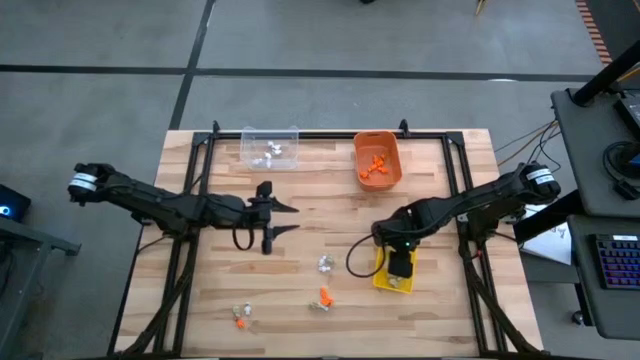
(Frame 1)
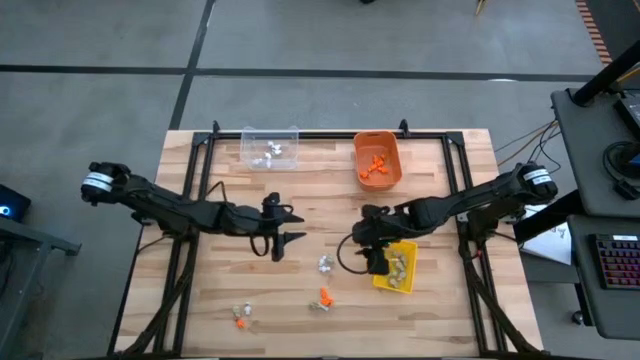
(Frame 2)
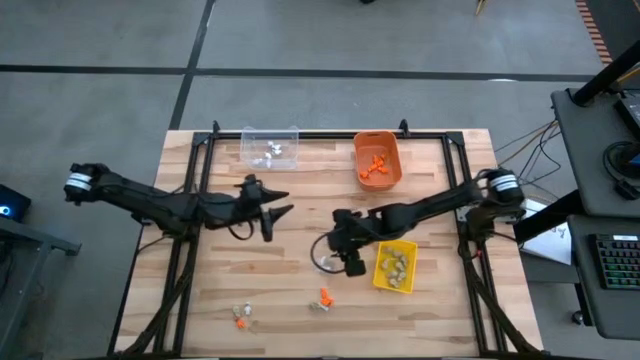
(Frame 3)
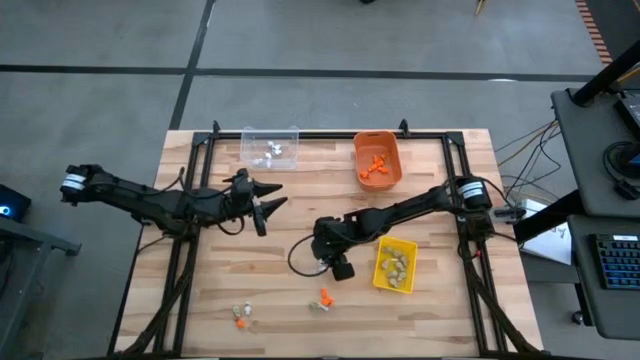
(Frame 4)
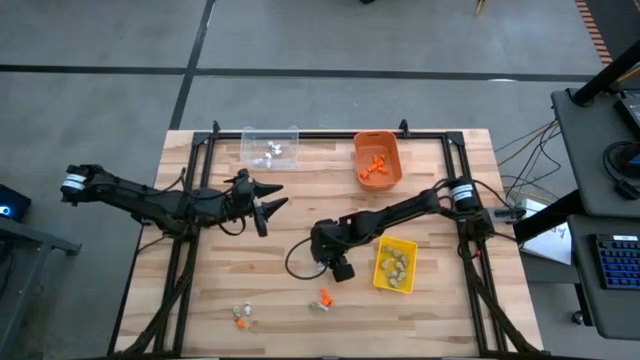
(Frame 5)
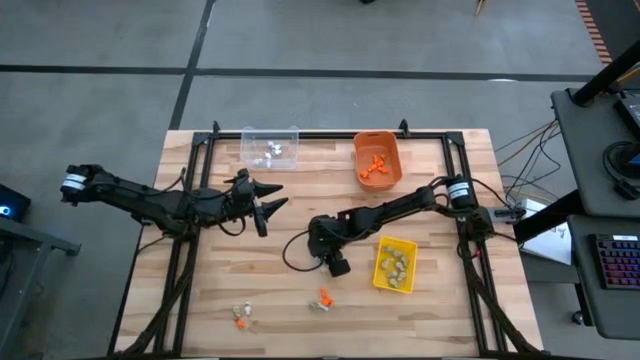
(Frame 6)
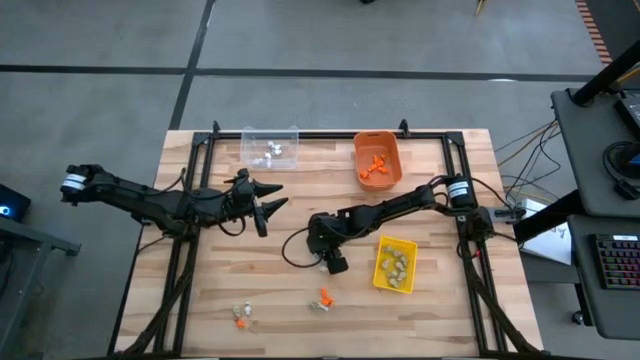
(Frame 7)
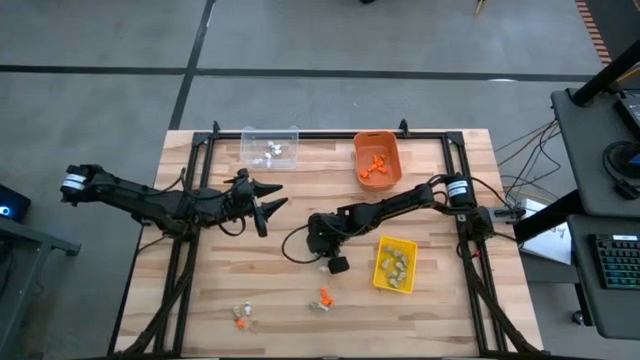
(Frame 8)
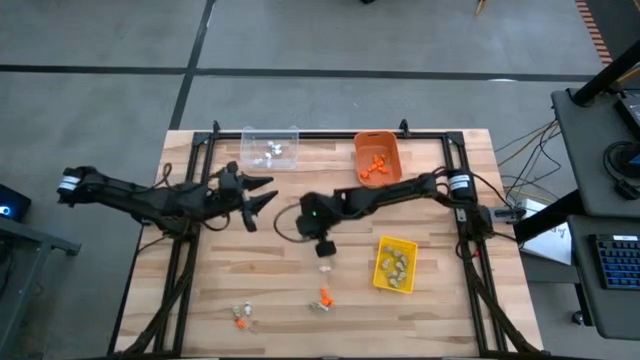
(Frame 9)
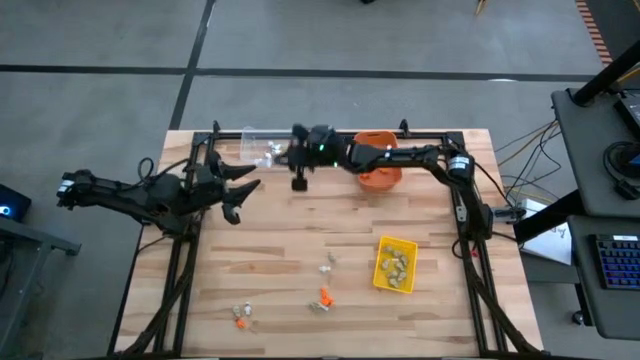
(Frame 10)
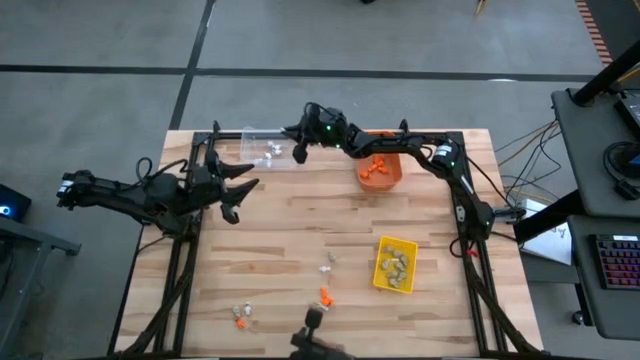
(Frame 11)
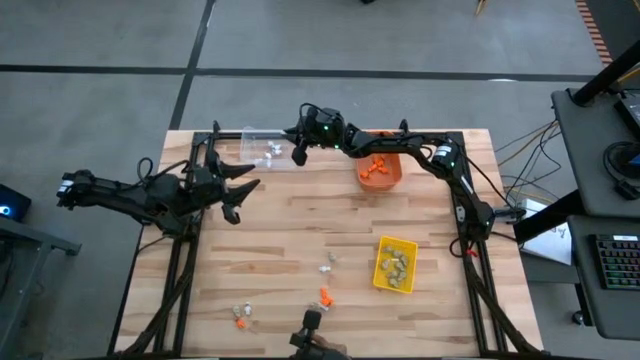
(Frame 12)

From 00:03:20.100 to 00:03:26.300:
Task: Sort Halloween decoration
Put the white skeleton toy into the transparent bin

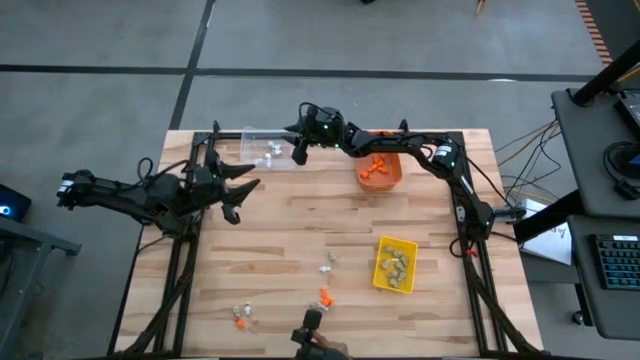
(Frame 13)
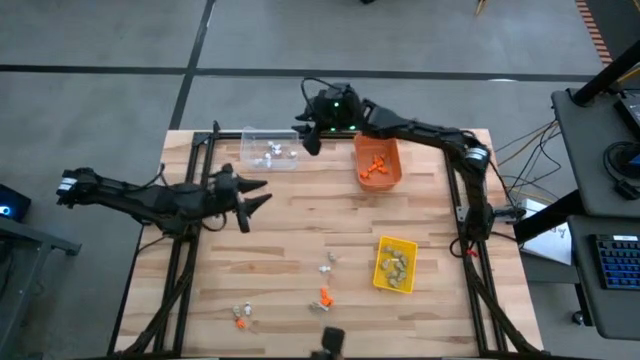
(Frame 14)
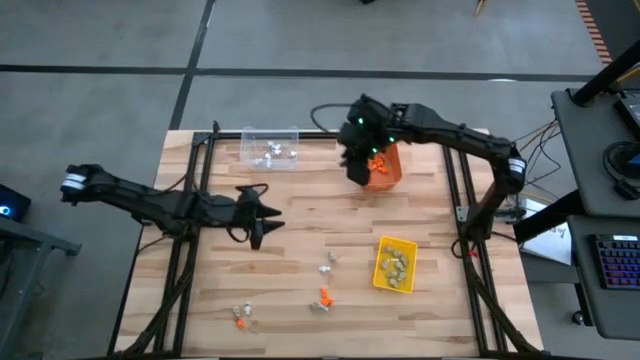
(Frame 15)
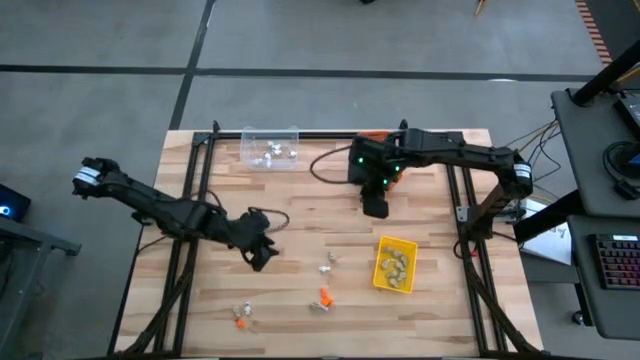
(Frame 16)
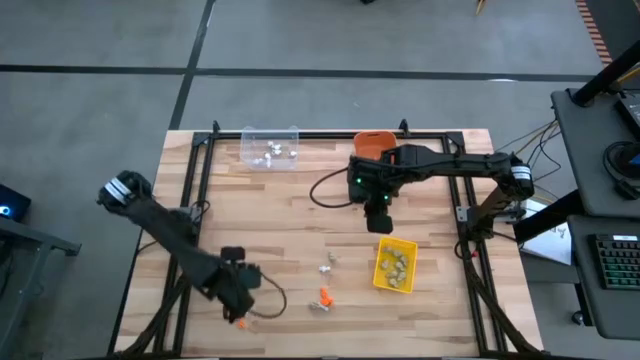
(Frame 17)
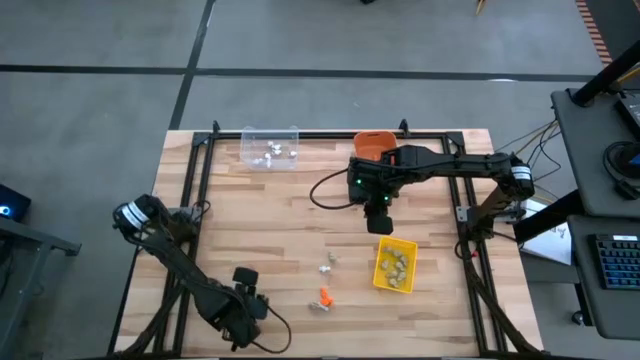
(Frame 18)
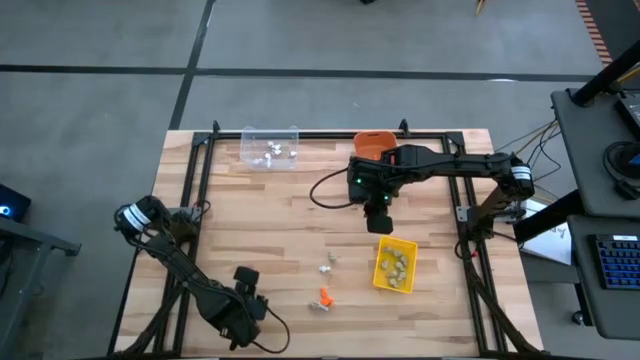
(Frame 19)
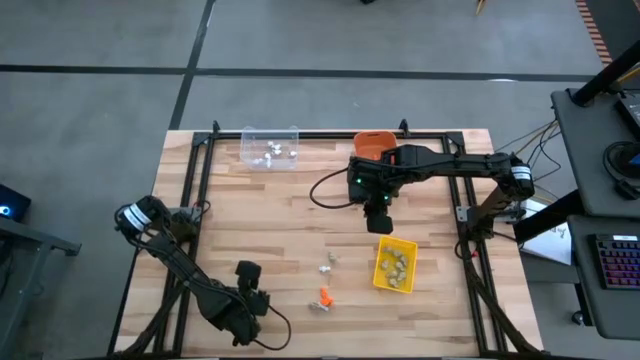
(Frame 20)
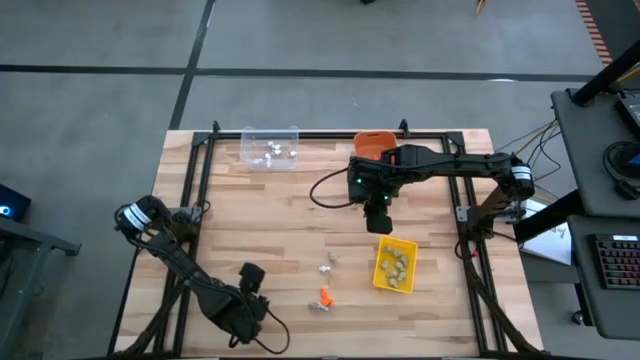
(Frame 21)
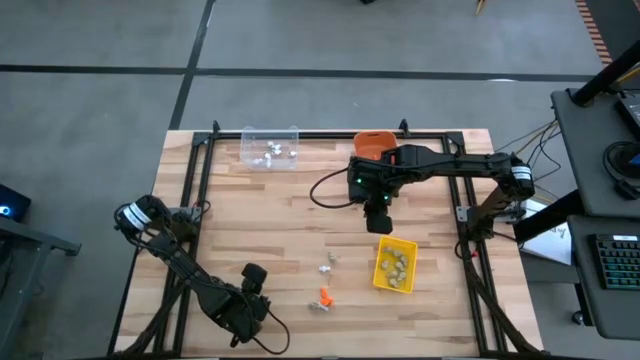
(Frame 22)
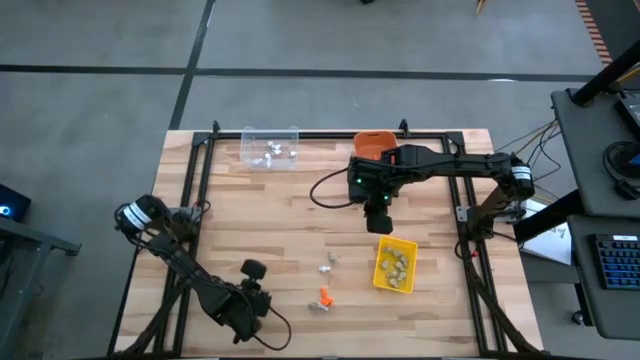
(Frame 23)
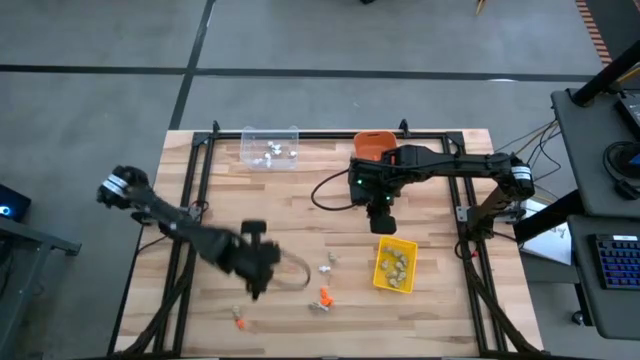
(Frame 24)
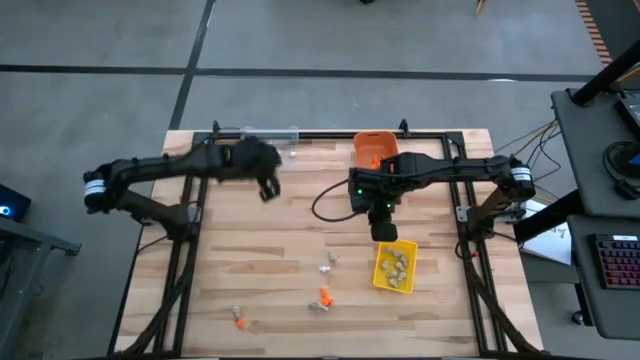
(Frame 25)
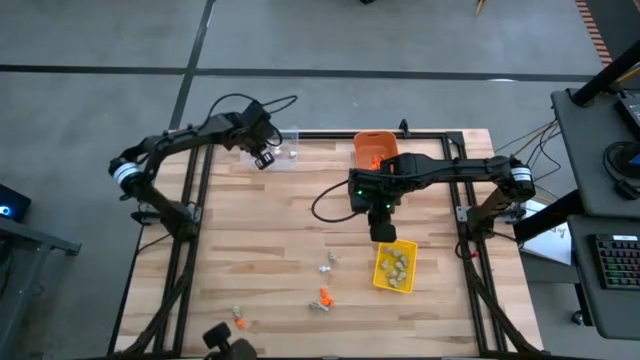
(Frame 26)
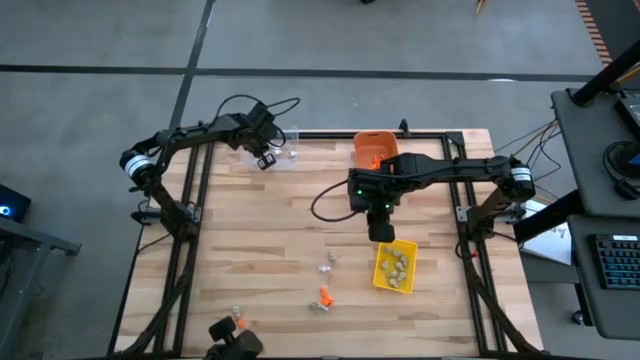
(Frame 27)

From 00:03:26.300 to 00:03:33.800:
Put the white skeleton toy into the transparent bin

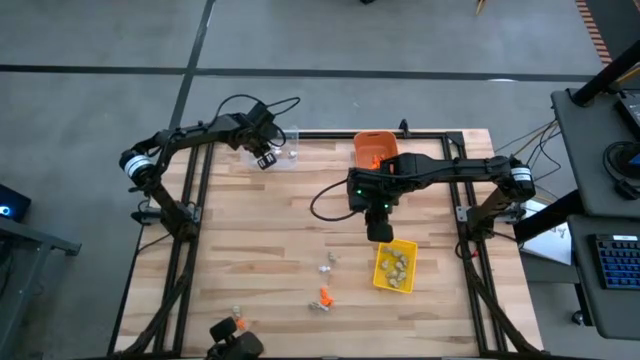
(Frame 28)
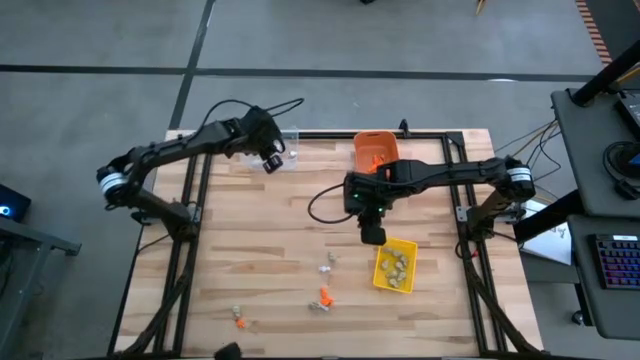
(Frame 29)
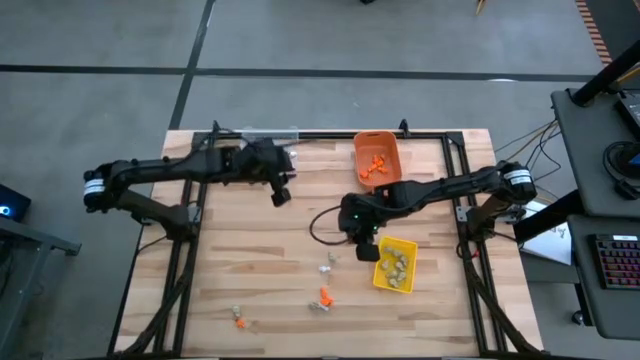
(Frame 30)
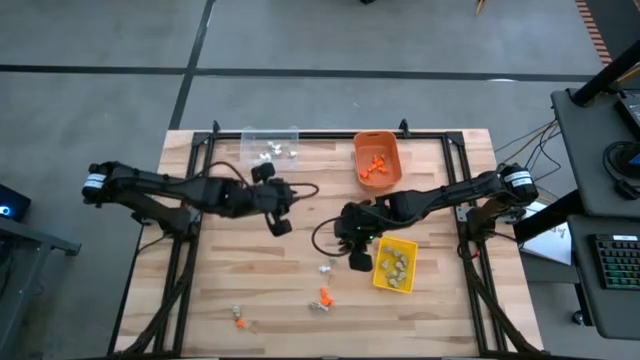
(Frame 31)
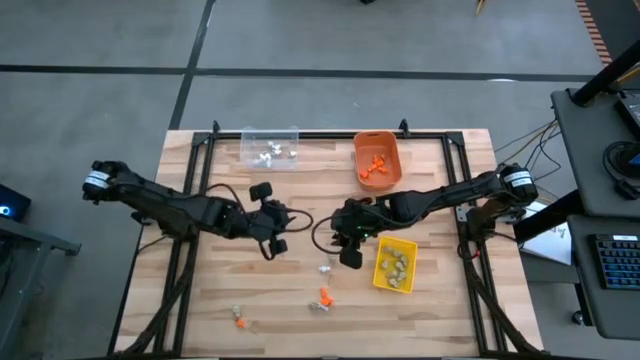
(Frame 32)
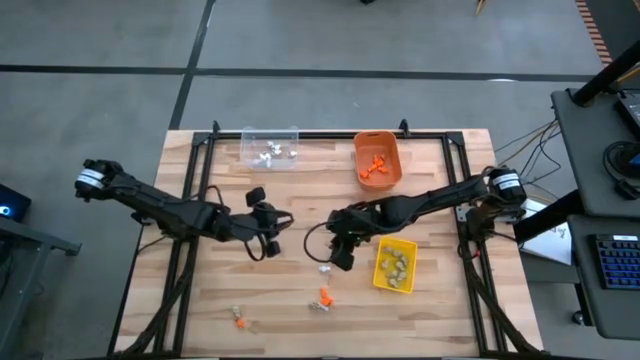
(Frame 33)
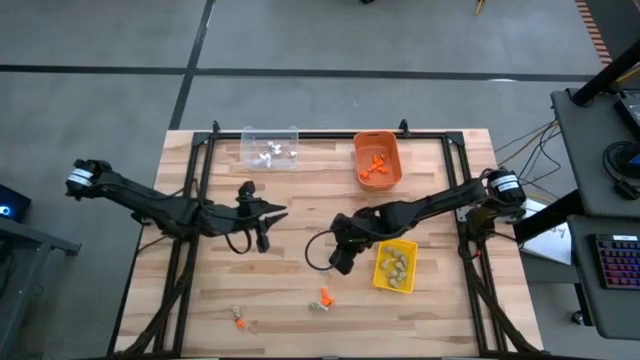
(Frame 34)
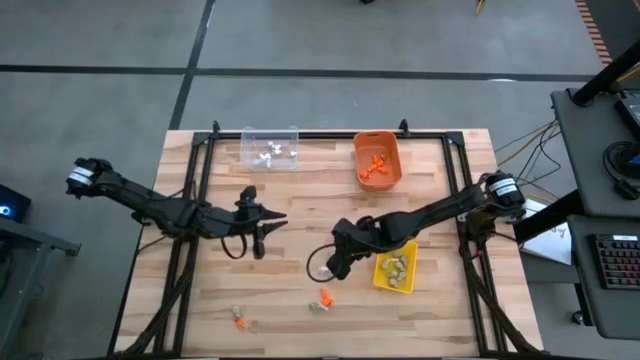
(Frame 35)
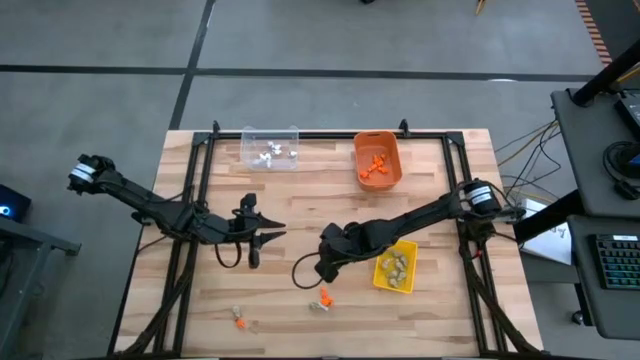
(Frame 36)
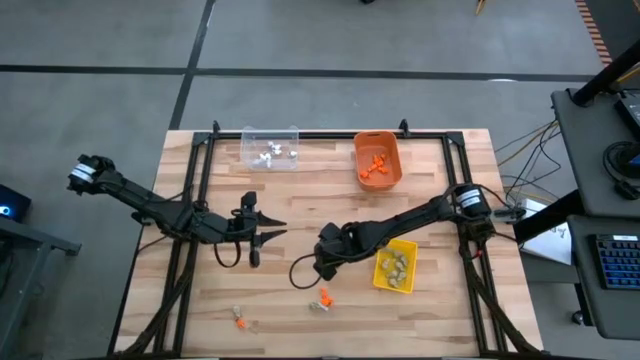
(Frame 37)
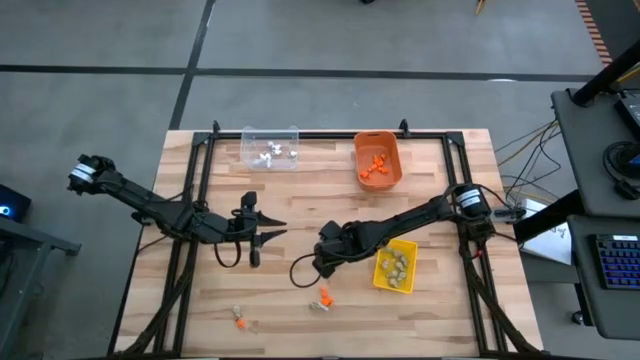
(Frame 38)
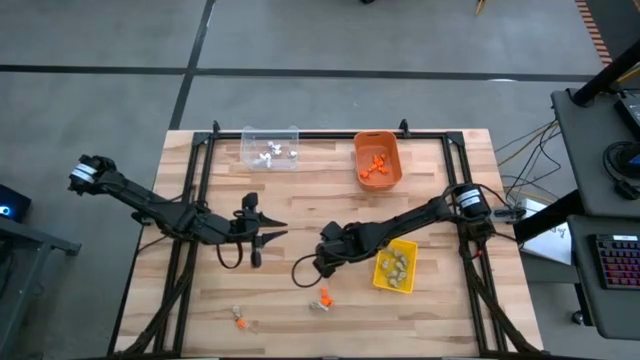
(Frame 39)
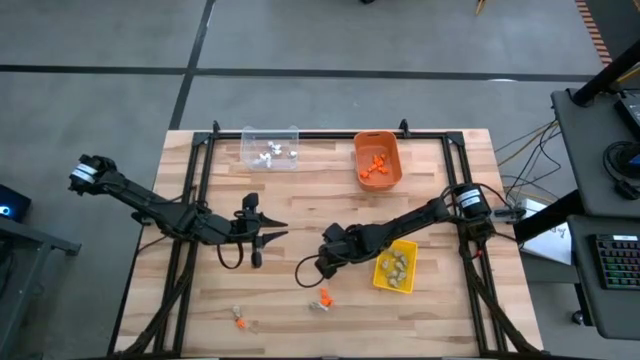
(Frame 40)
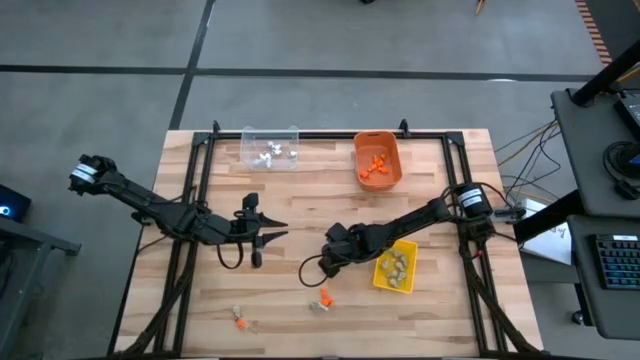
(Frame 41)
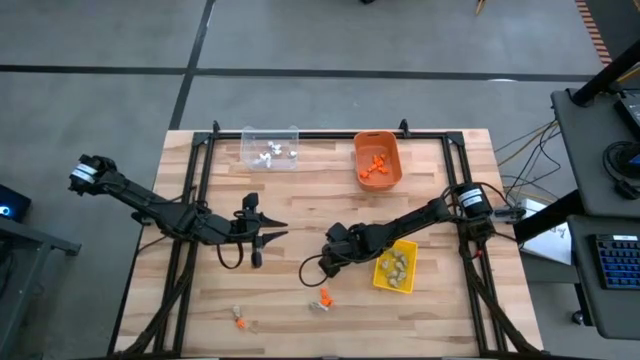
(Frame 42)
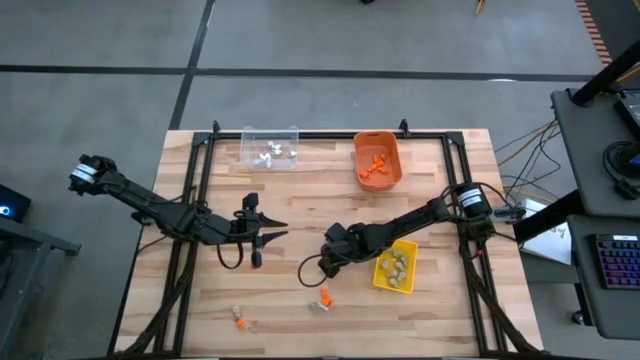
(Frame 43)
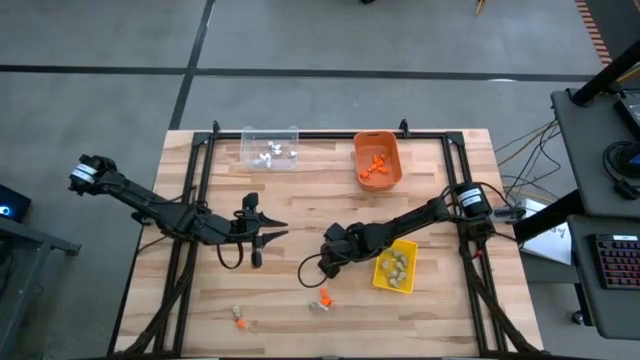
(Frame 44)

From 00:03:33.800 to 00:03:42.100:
Put the gray skull toy into the yellow bin
